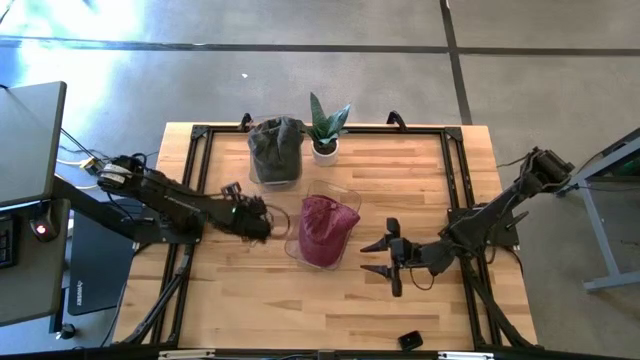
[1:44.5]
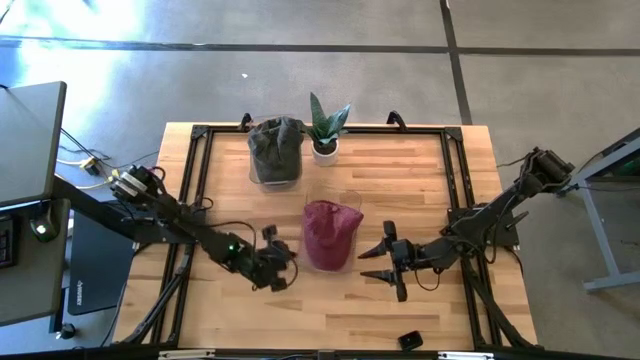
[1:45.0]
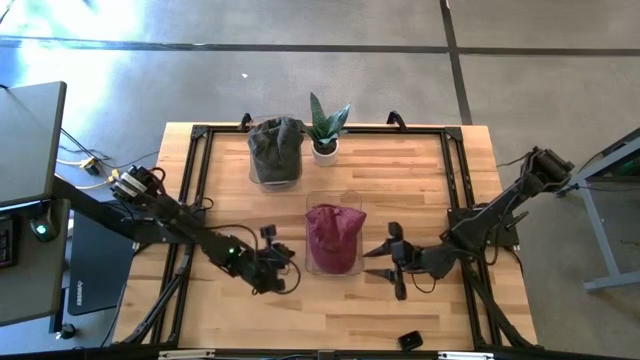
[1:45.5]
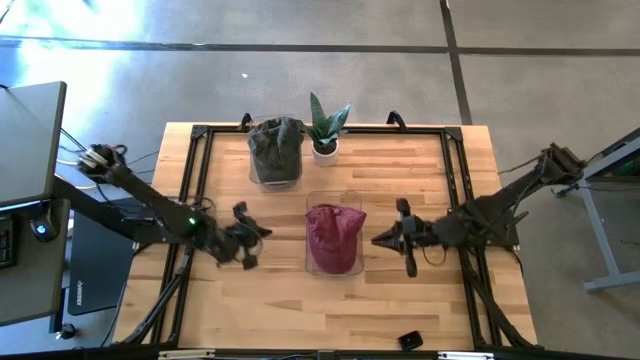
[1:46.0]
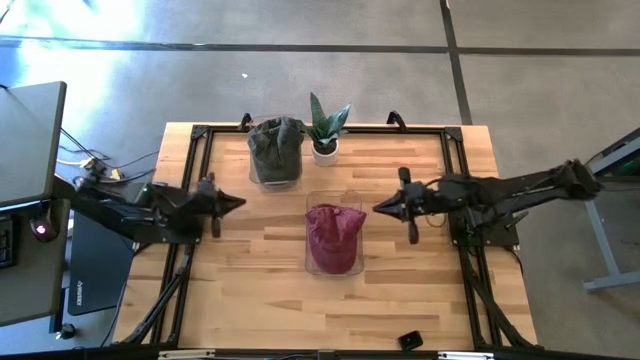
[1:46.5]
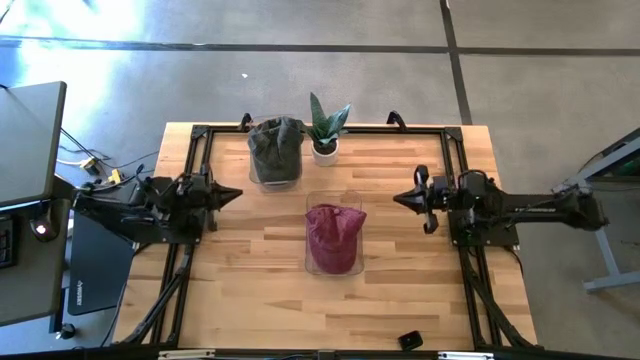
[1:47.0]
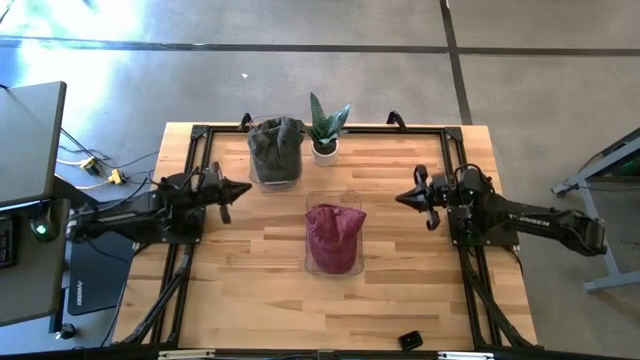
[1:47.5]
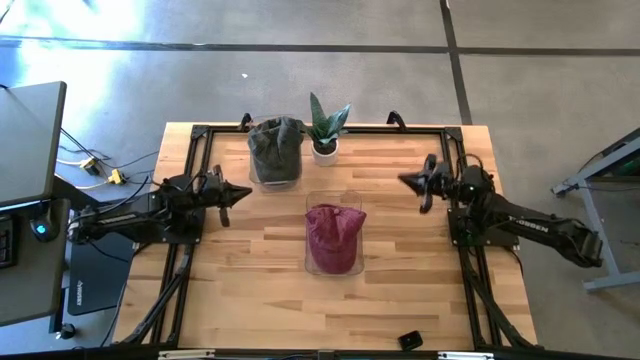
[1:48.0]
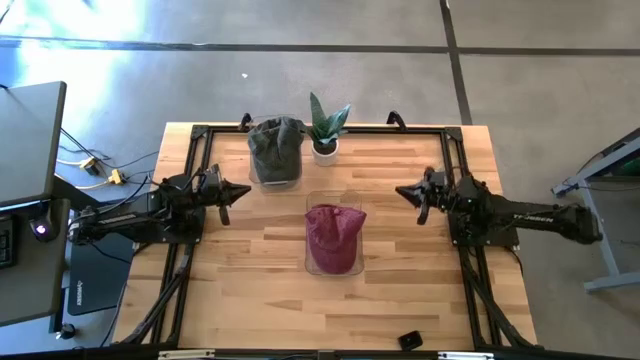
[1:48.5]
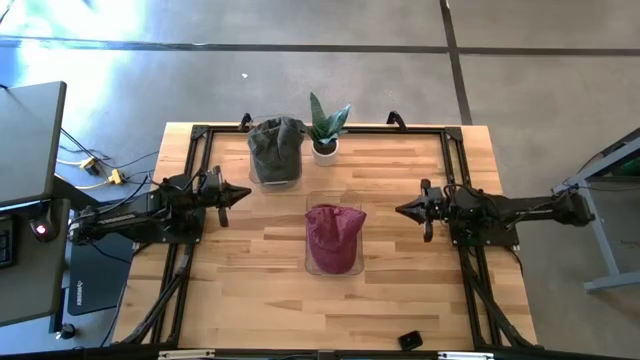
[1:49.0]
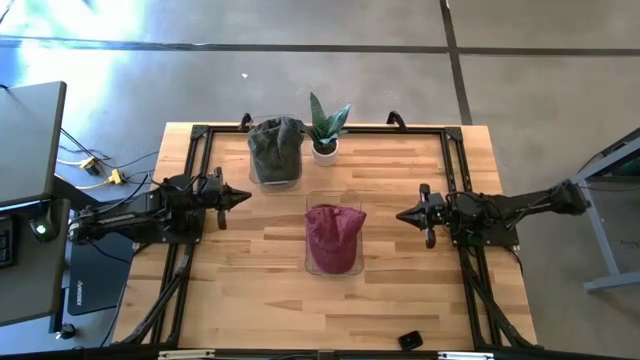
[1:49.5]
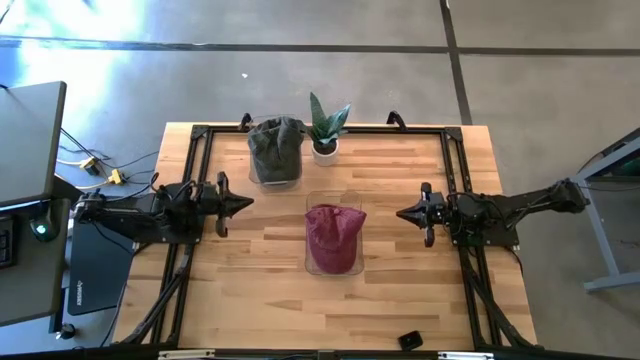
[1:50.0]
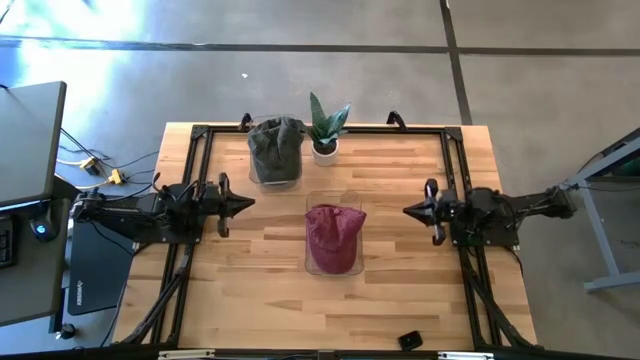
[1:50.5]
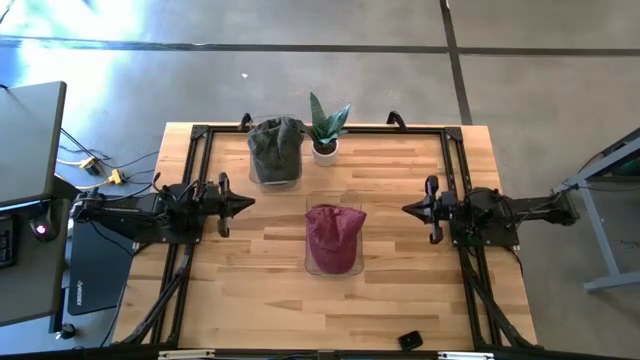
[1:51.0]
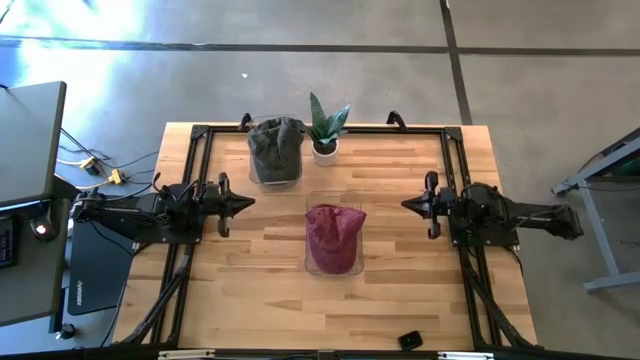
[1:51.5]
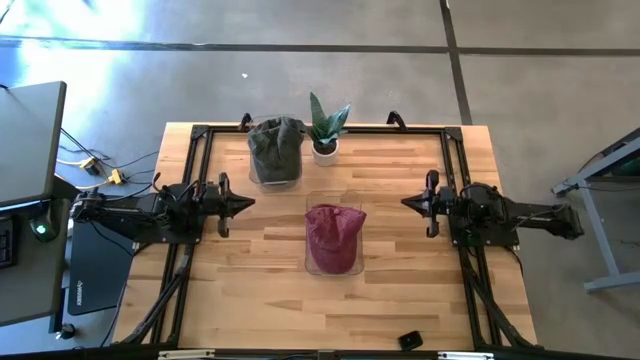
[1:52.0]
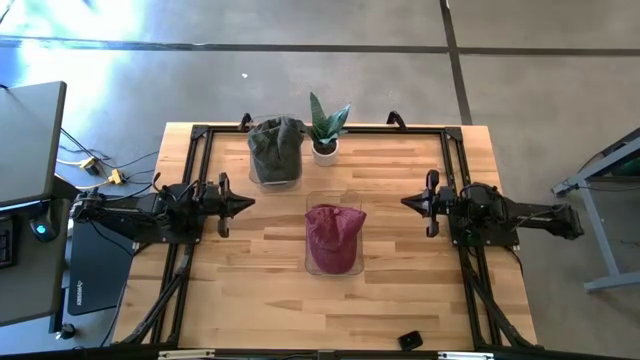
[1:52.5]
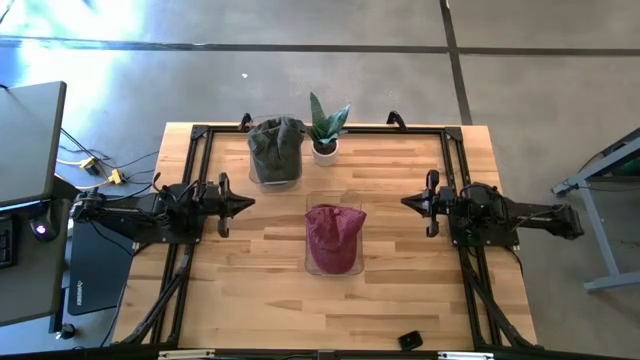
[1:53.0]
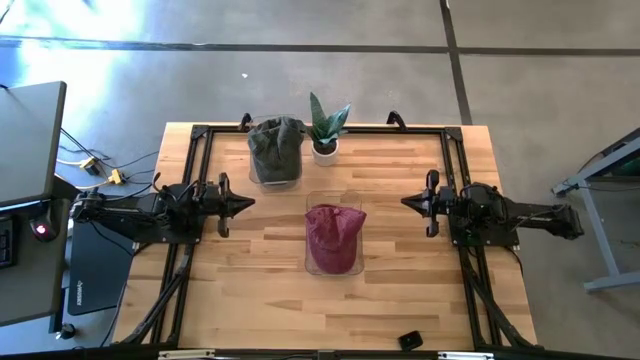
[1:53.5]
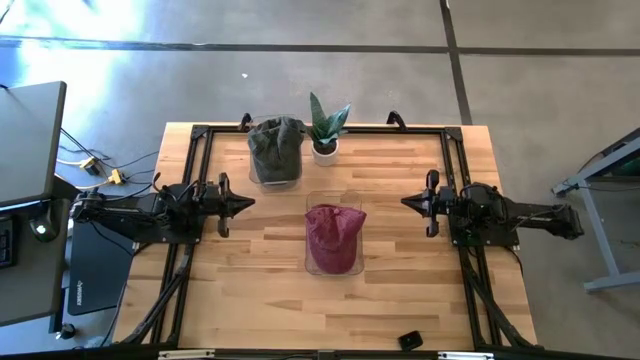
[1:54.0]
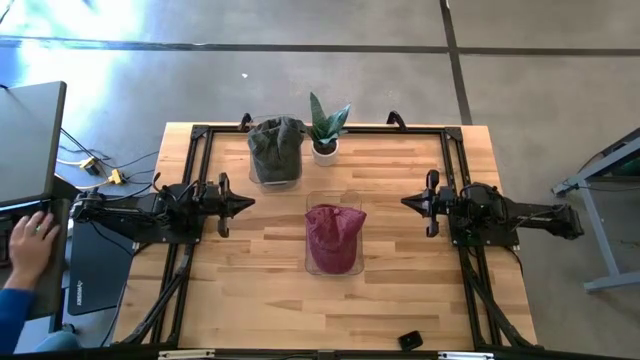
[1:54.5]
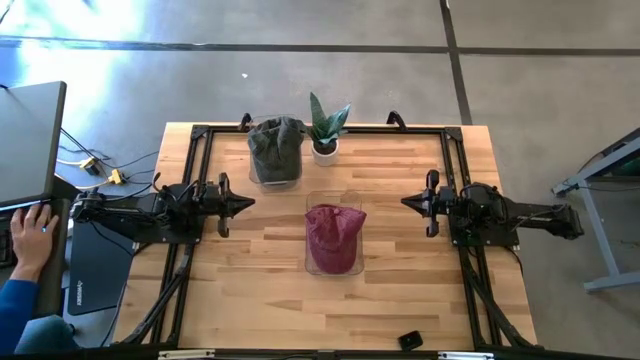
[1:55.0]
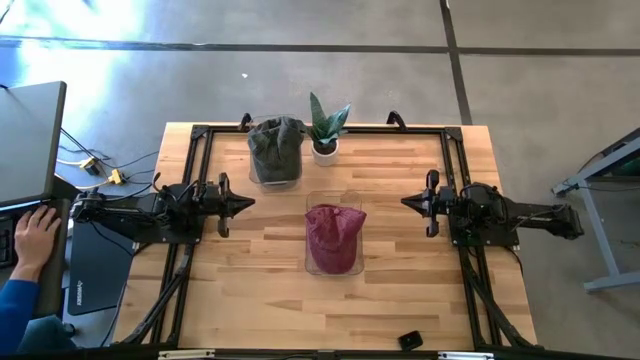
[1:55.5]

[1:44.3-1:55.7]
Task: Pick & Place hat
Return to Home Position

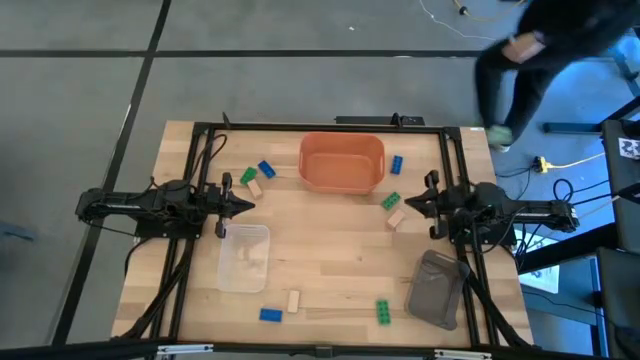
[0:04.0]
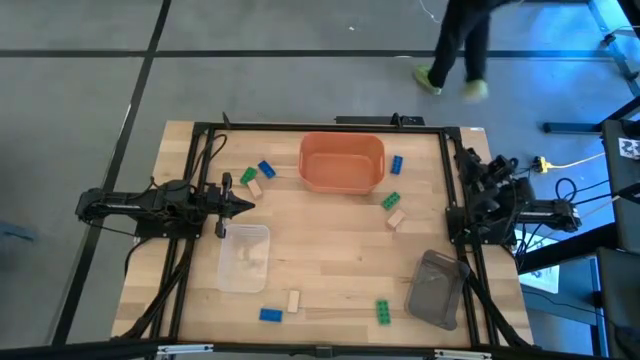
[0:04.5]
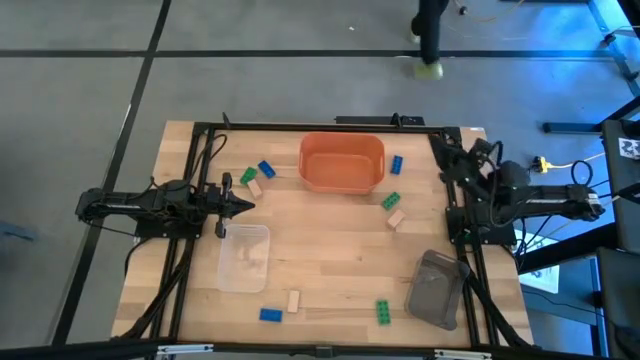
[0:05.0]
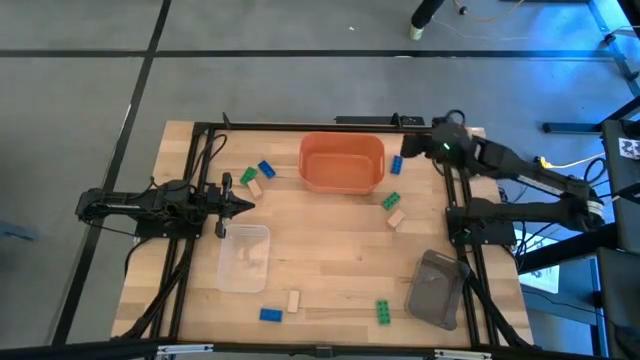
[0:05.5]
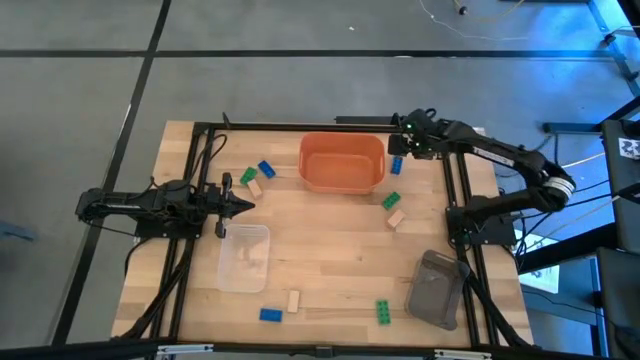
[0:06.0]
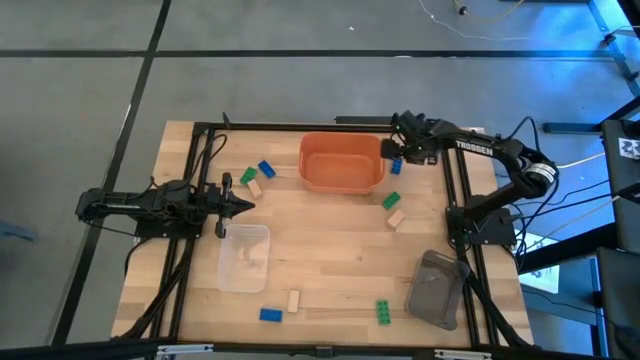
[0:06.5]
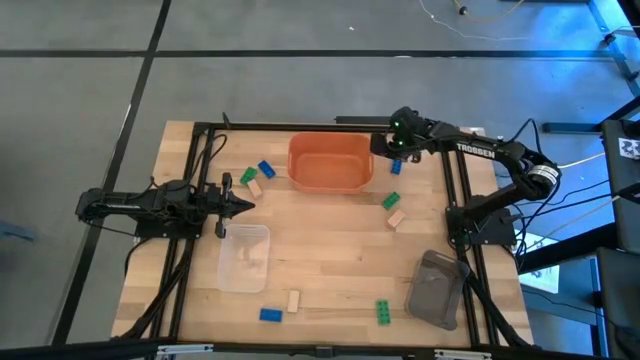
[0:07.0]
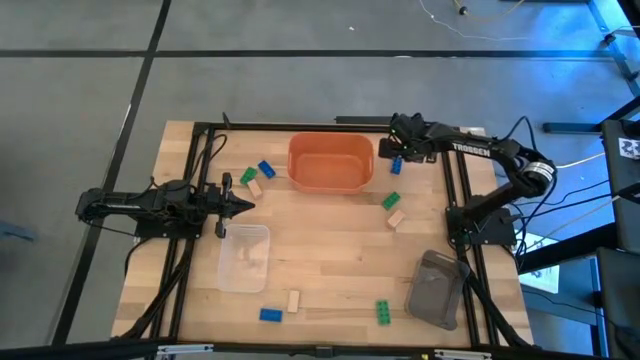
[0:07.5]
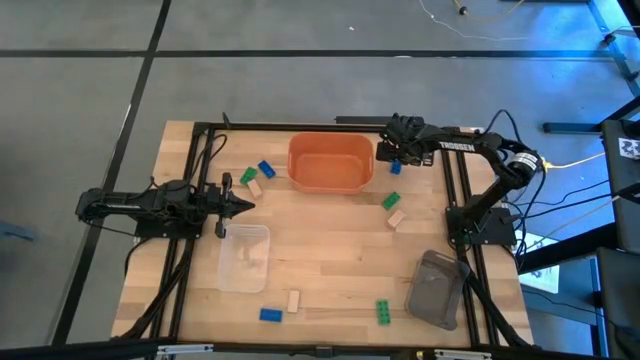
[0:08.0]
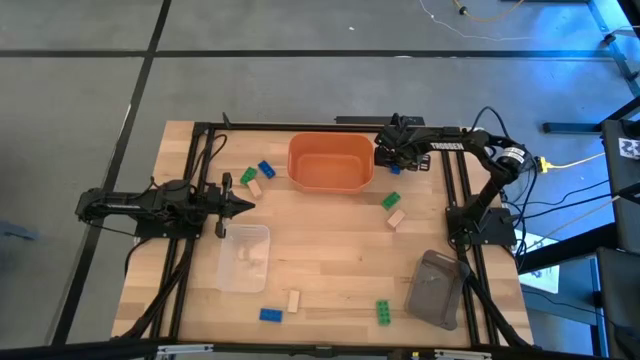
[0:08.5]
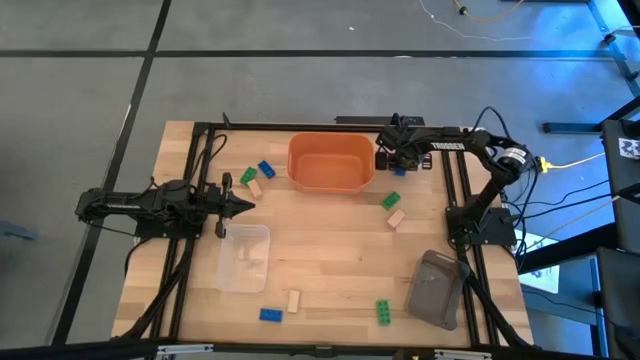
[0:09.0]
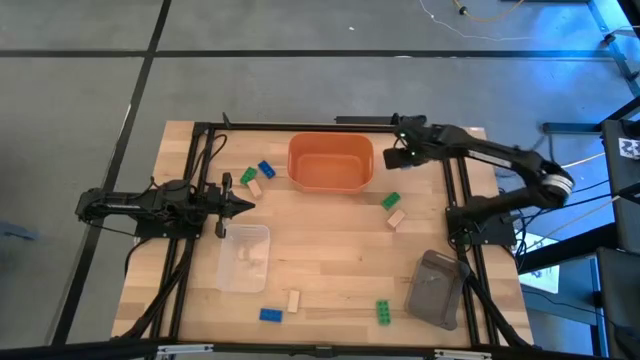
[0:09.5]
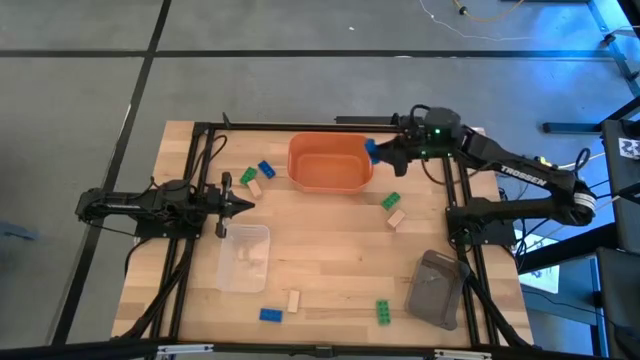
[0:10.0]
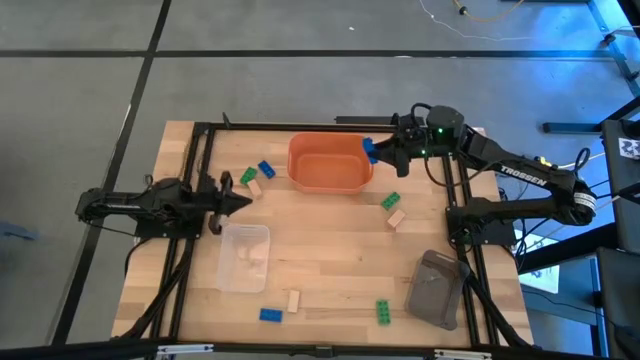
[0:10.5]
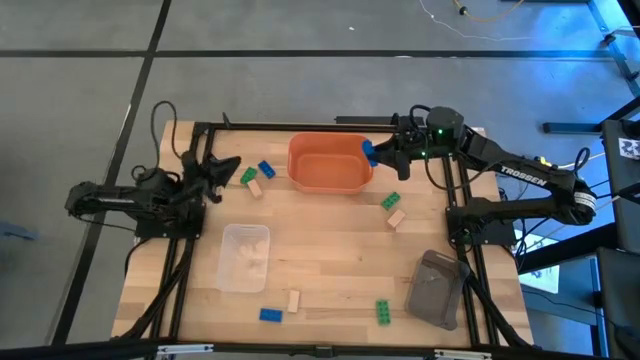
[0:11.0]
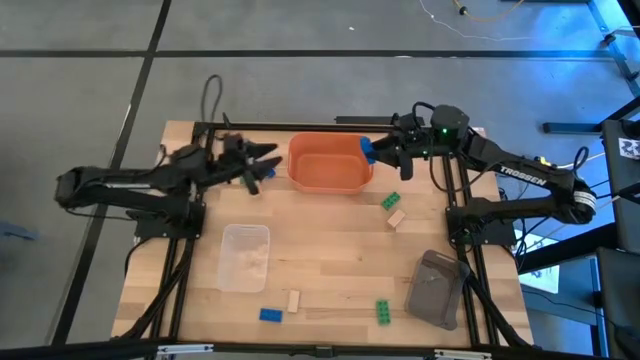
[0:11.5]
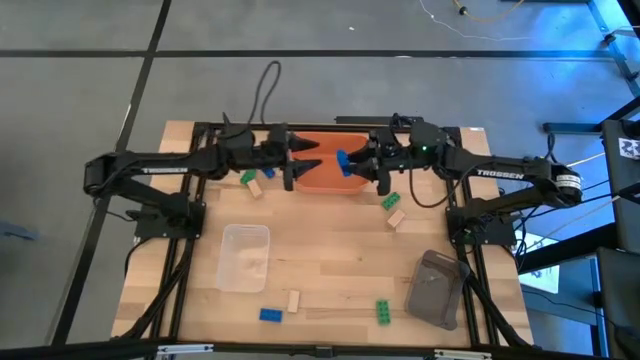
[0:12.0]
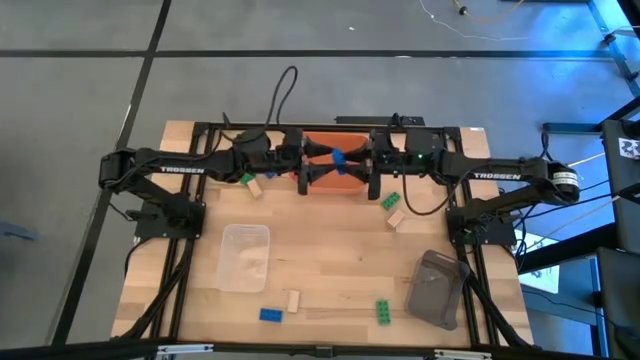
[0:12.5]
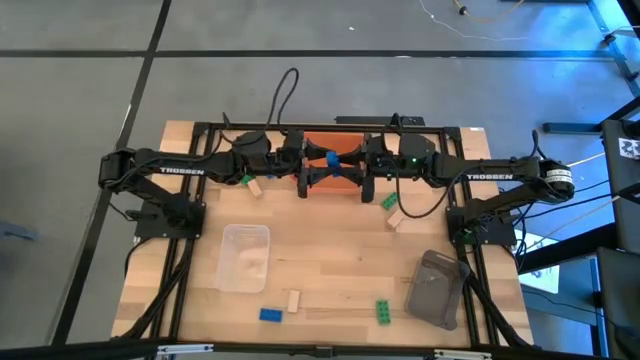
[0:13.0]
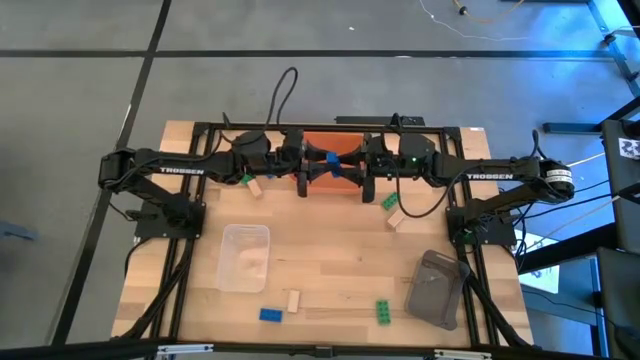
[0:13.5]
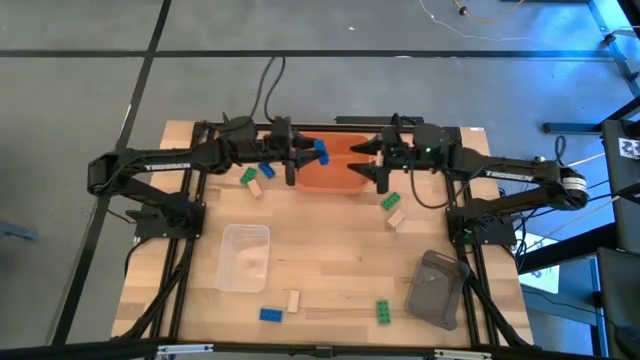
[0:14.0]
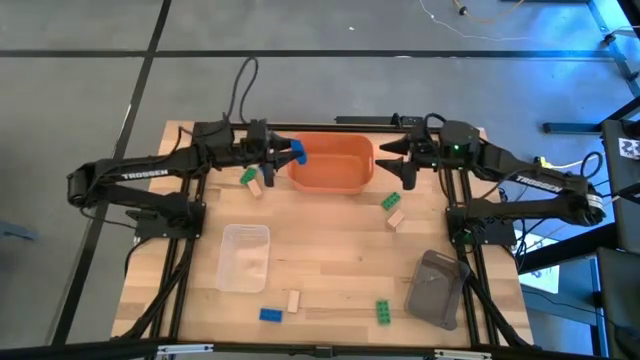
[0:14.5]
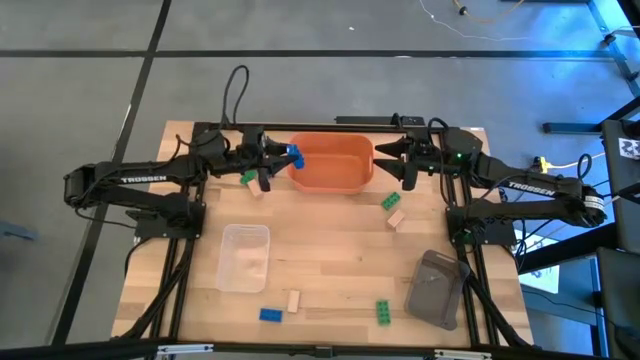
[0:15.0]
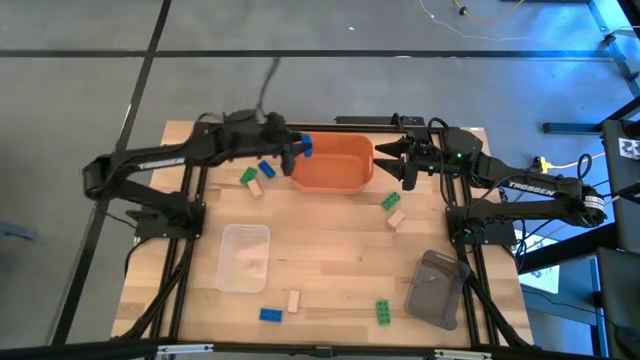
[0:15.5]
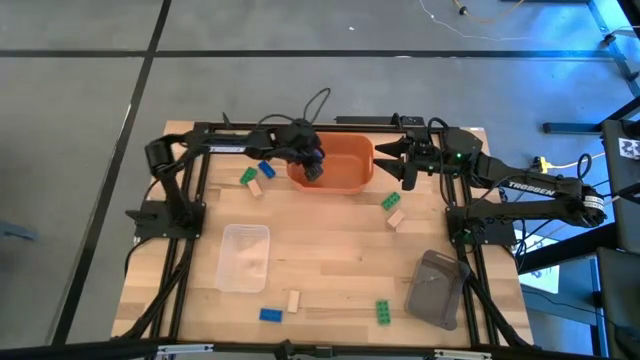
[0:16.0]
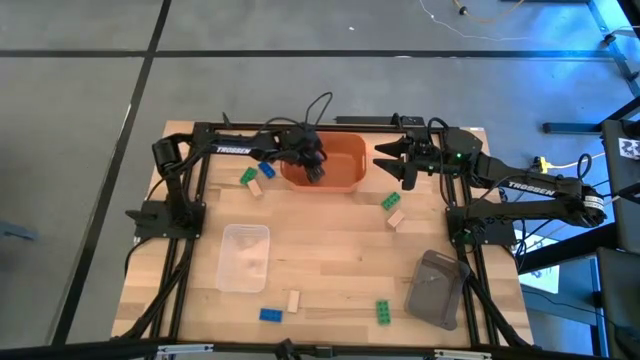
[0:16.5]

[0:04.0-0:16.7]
Task: Sort & place blocks by color
Put the top right blue game piece into the orange bin
